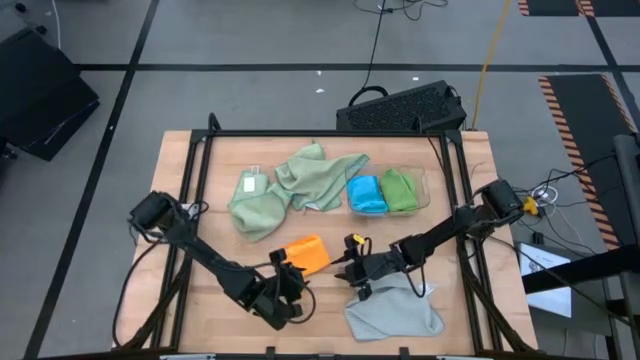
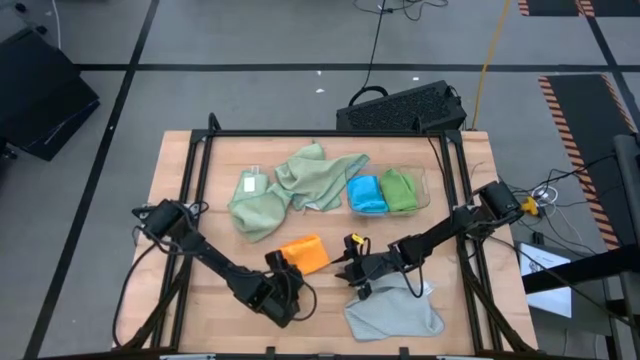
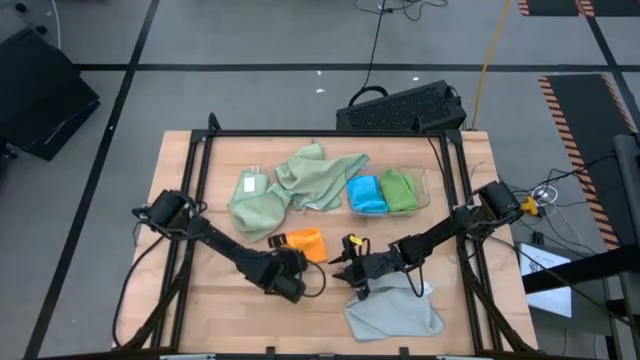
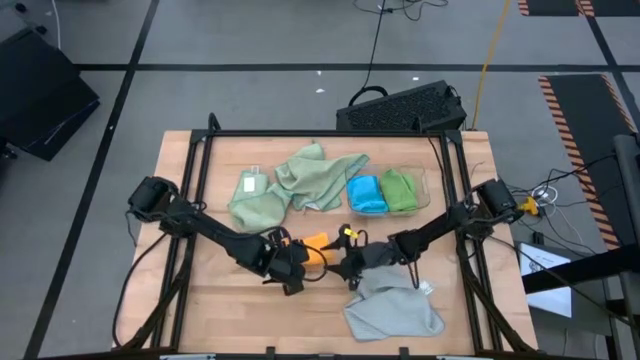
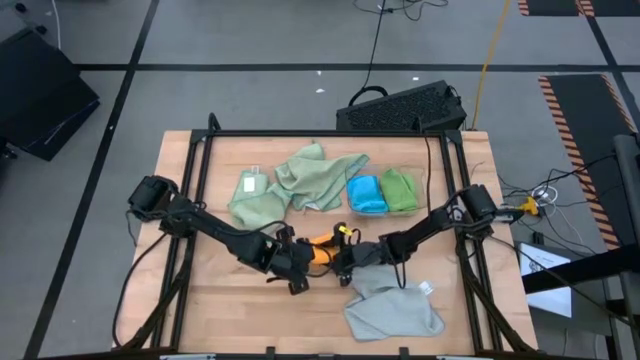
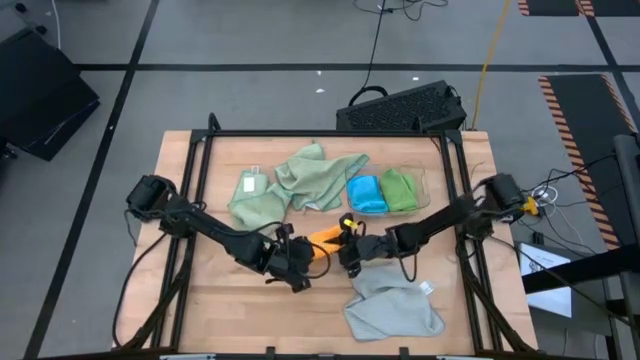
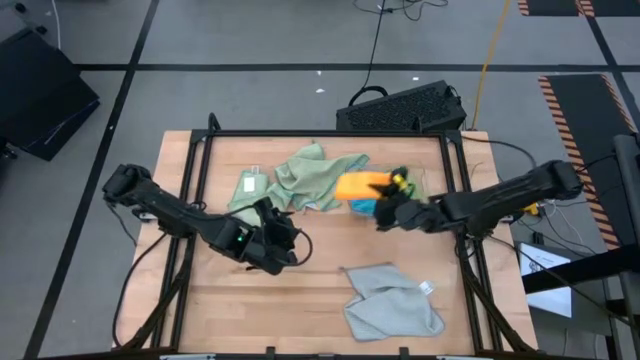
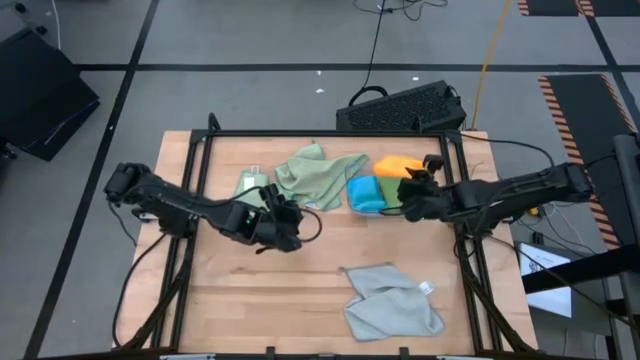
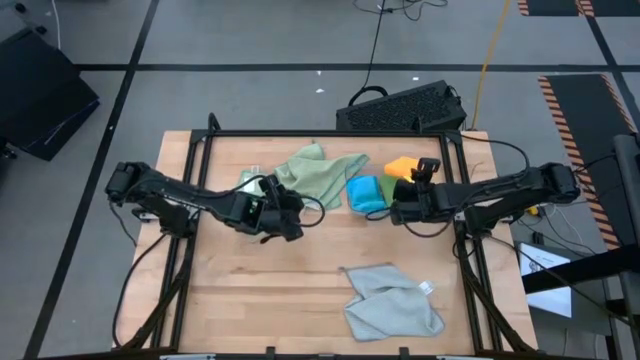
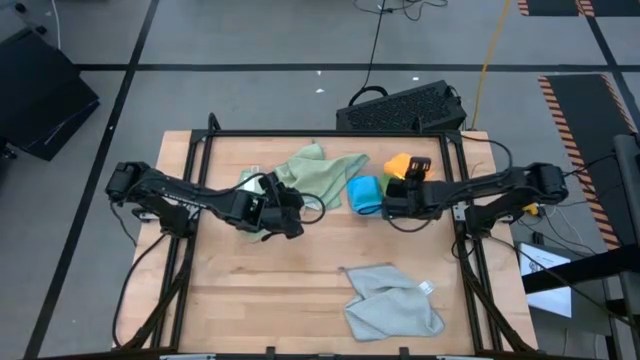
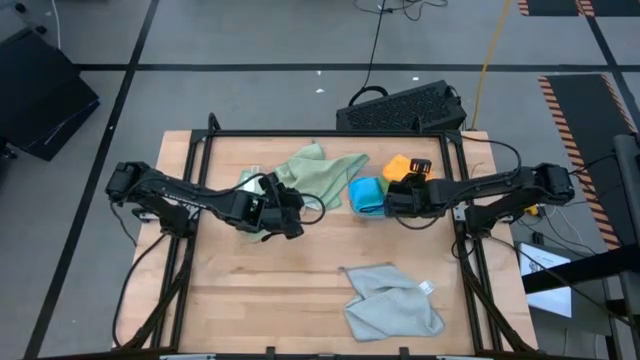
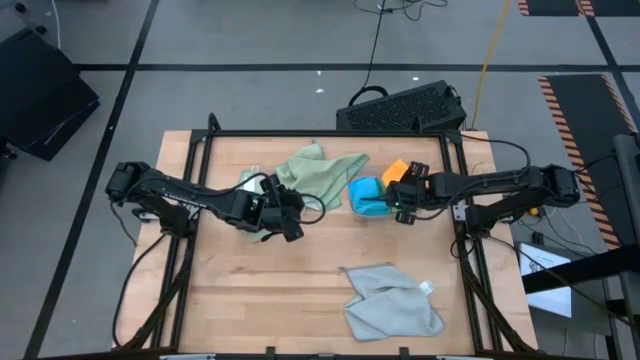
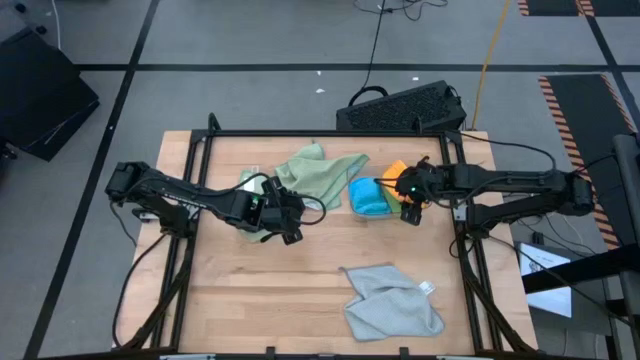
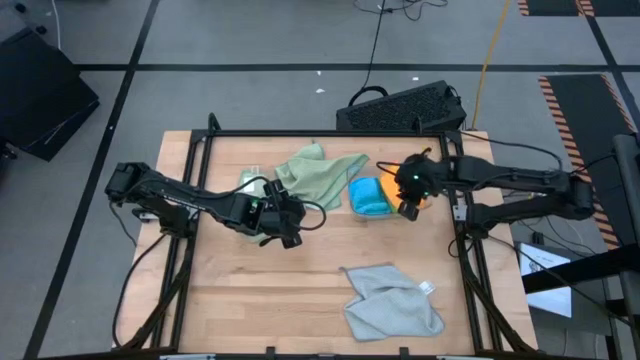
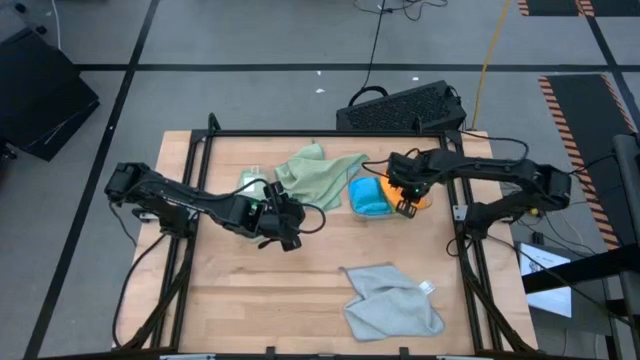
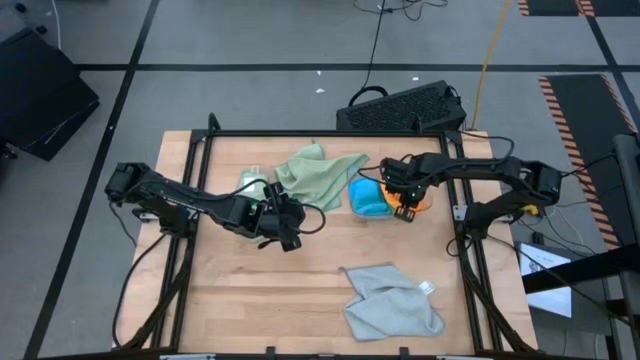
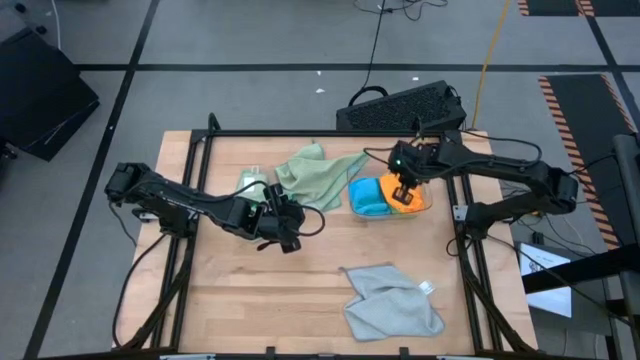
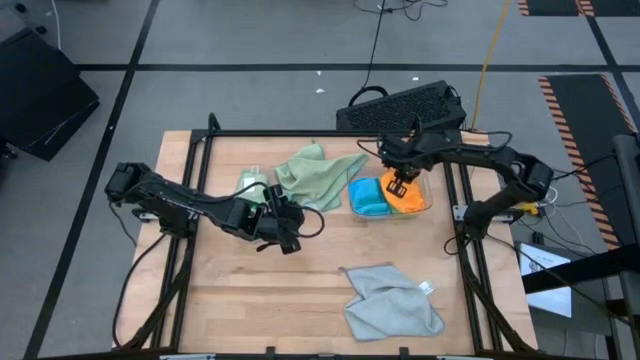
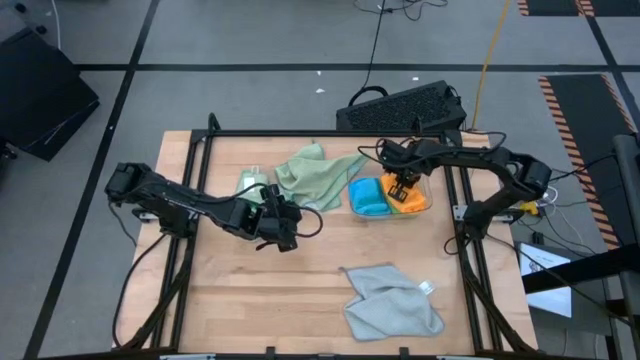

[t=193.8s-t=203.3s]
Task: Fold microfiber towels
Put the folded yellow microfiber cloth into the transparent bin

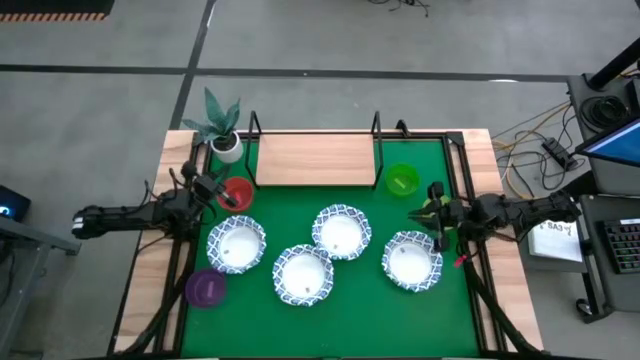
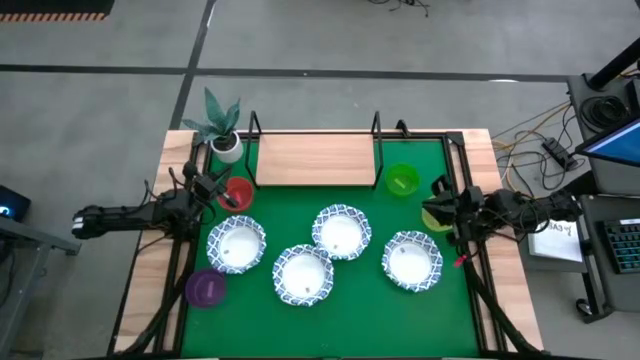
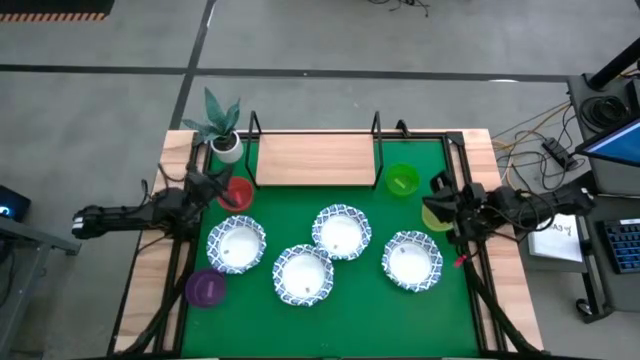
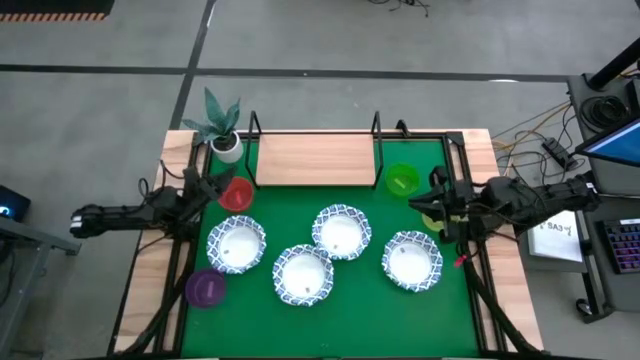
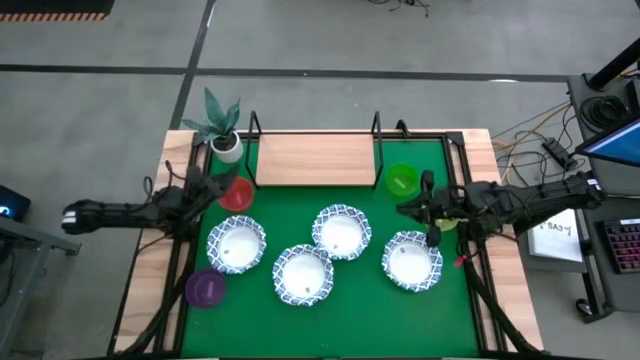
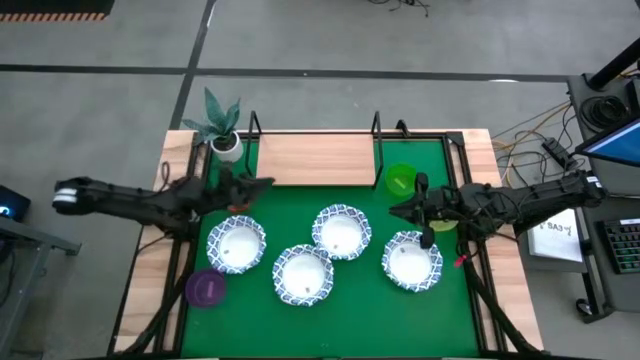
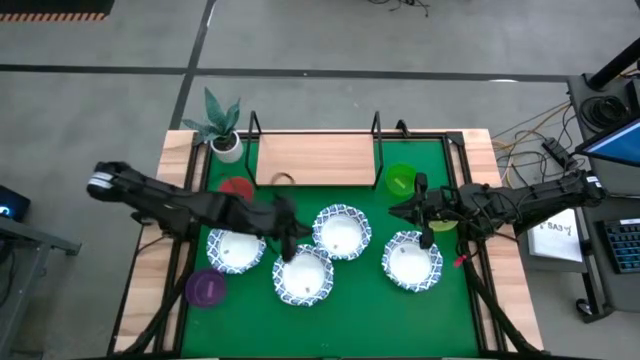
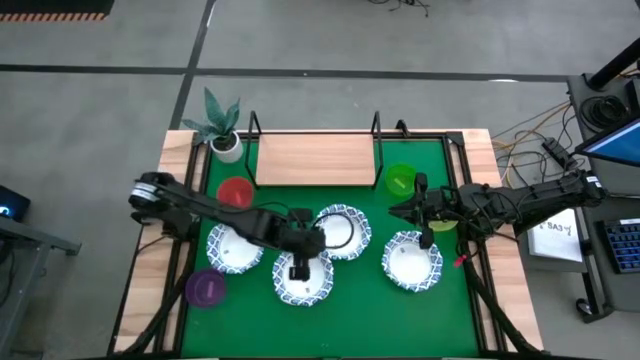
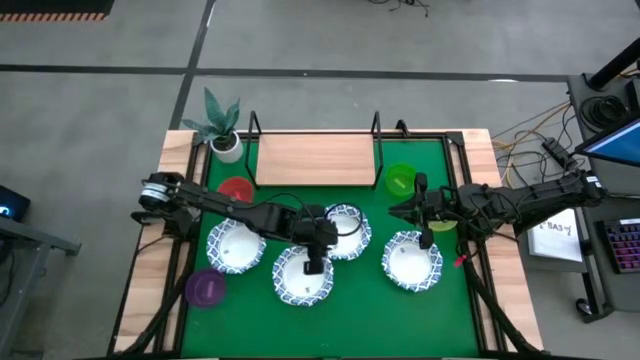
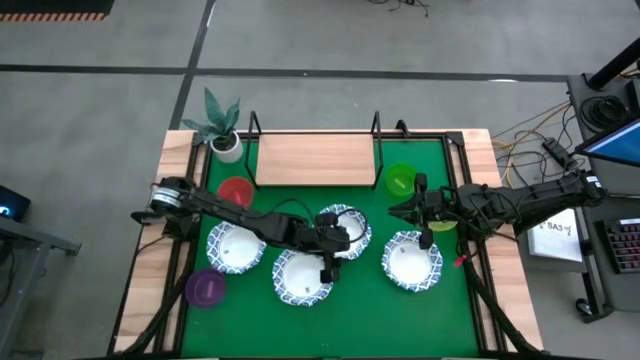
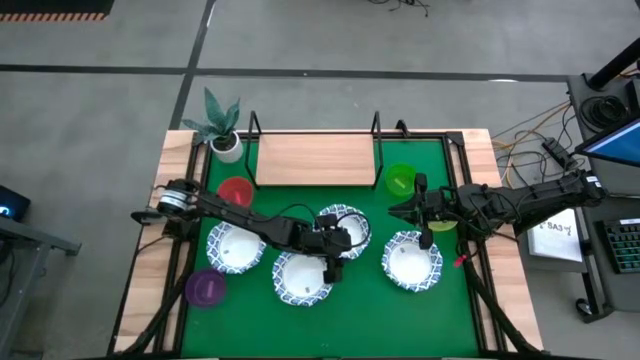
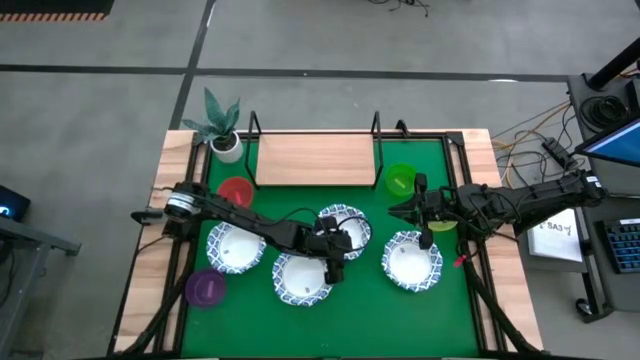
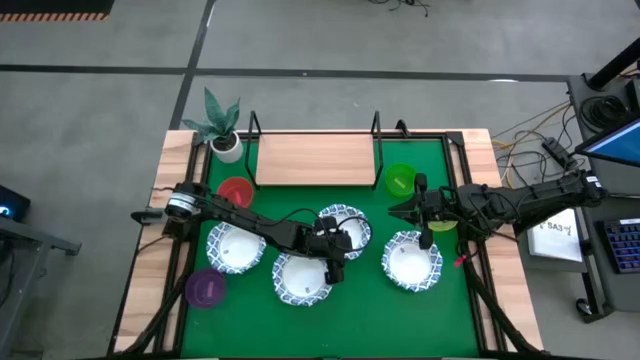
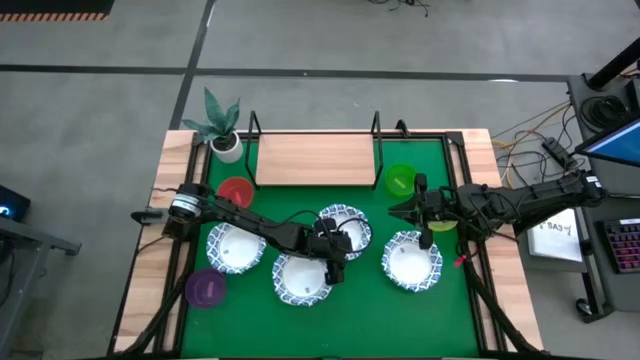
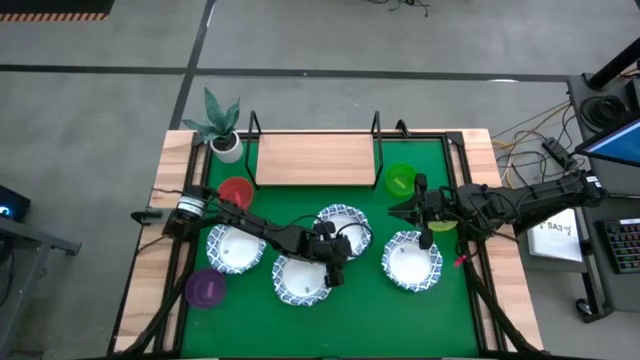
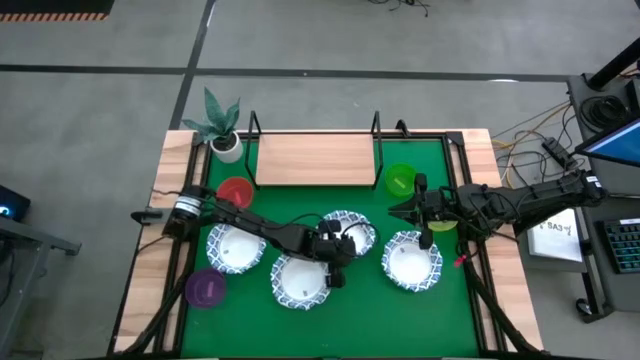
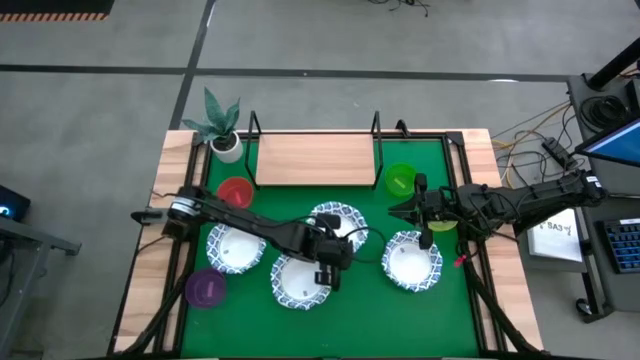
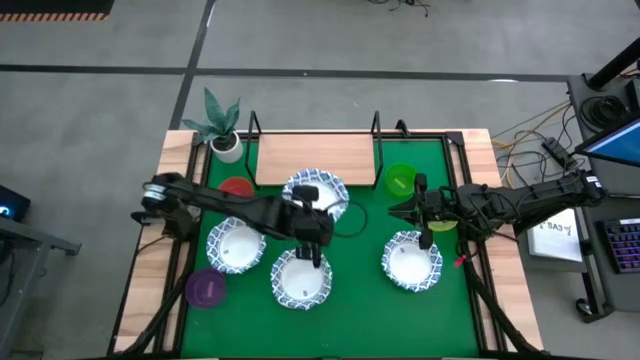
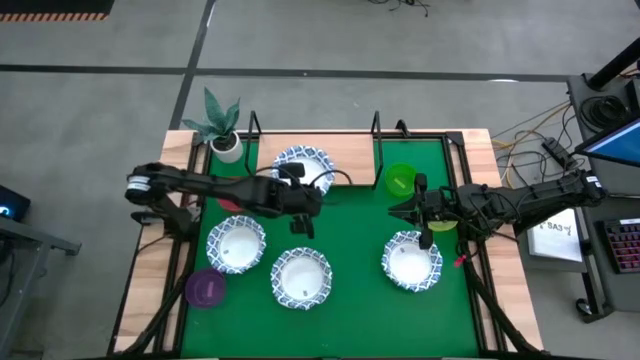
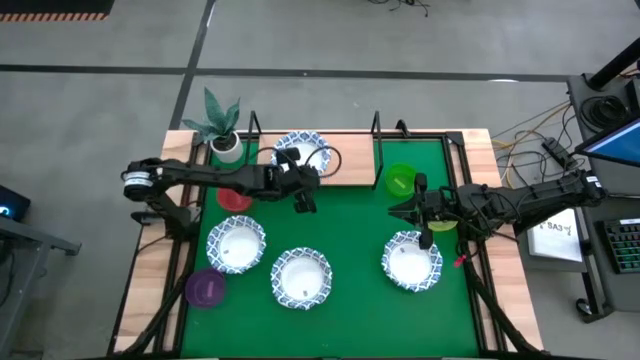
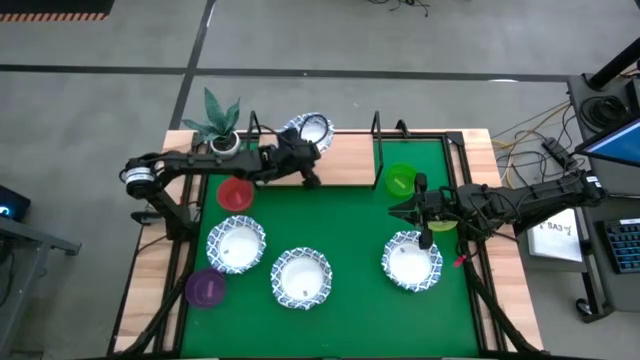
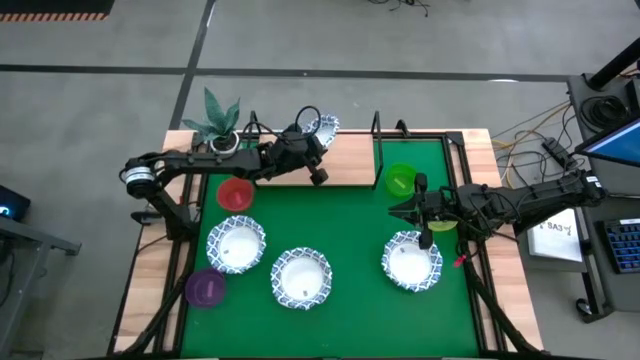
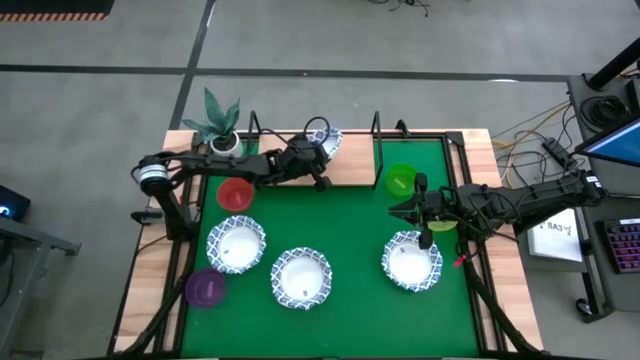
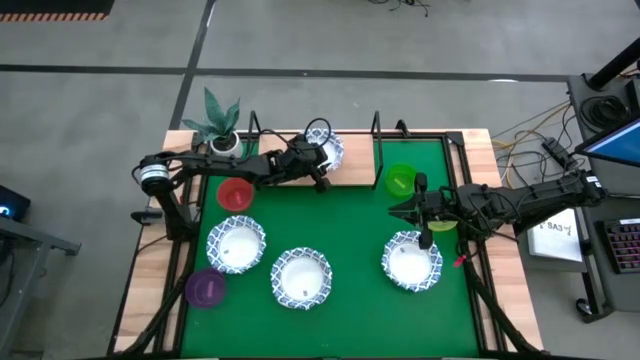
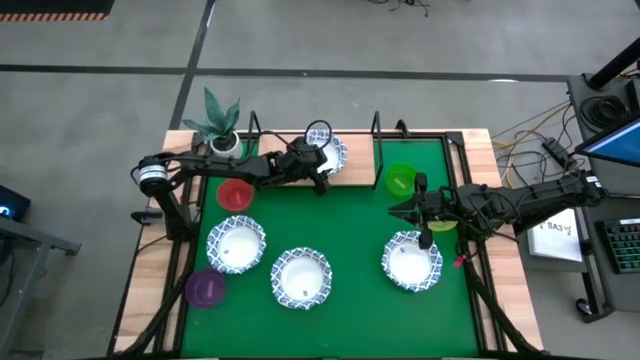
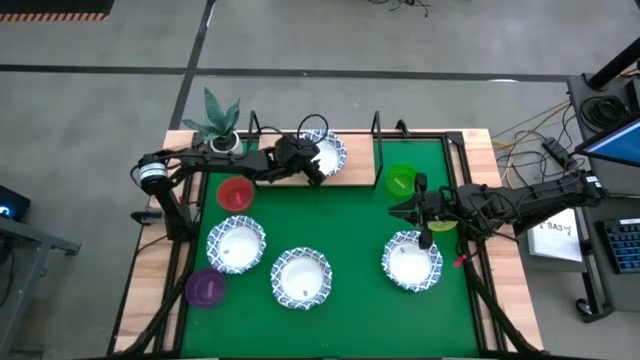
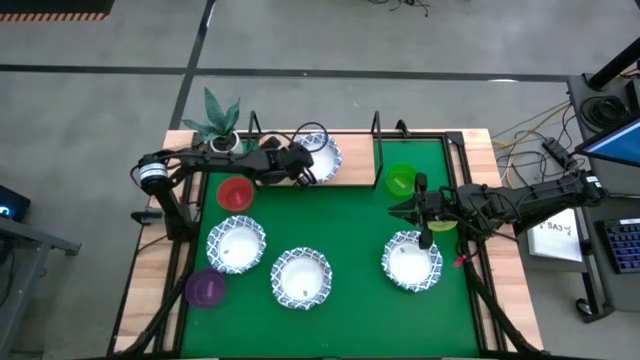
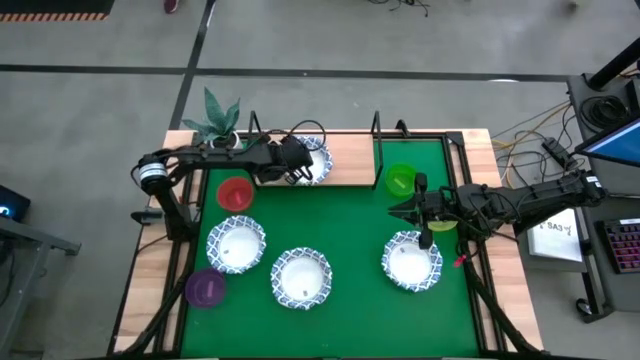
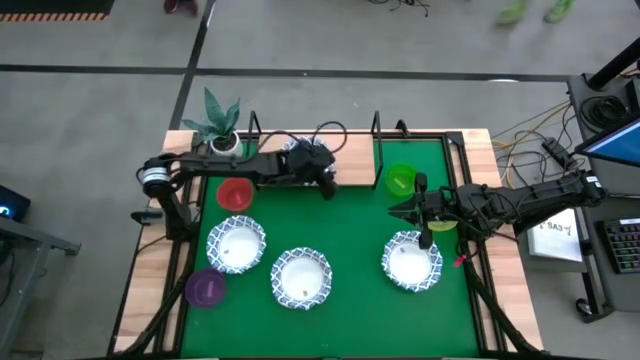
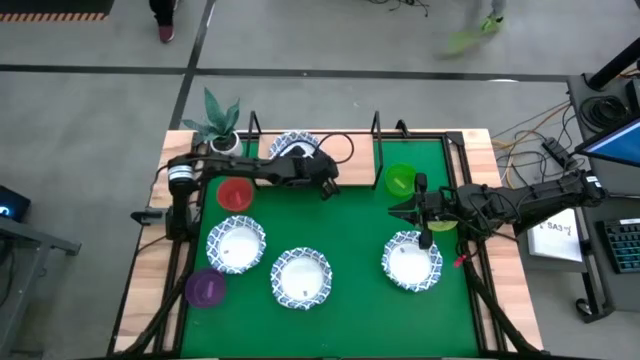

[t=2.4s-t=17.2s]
Task: Place and stack bowls onto a shelf
Put the white patterned bowl on the shelf
